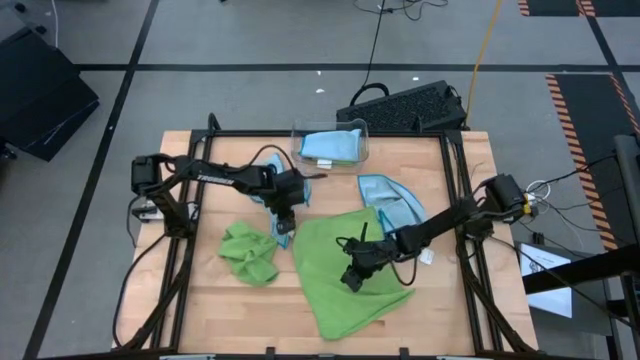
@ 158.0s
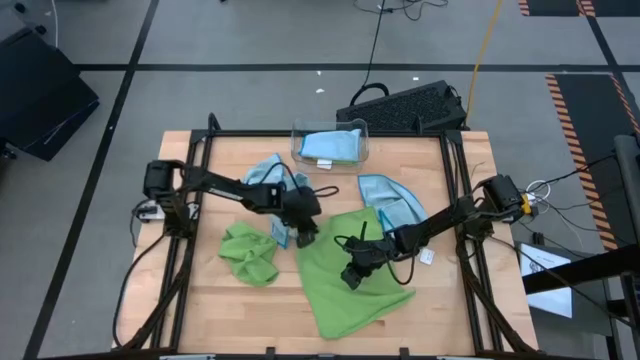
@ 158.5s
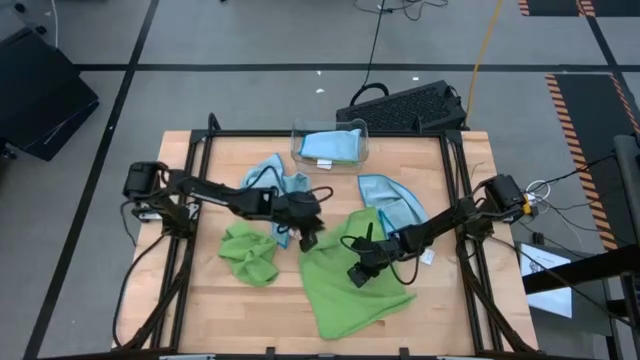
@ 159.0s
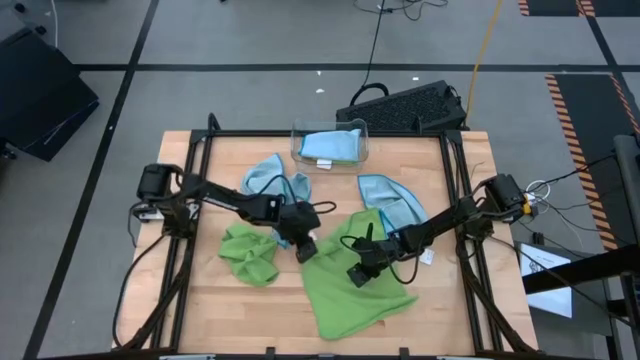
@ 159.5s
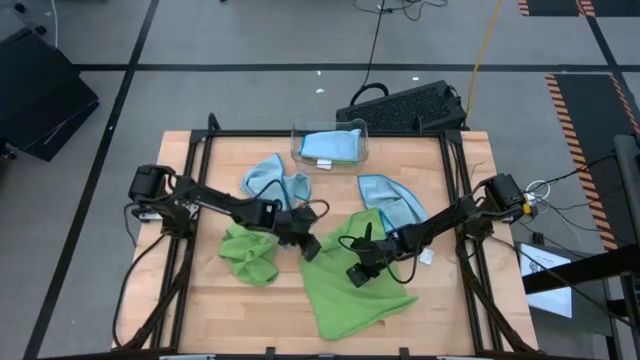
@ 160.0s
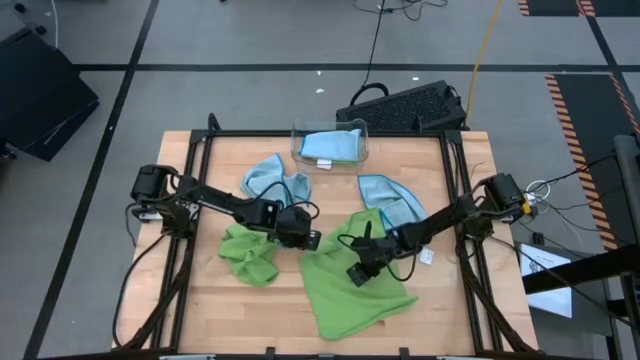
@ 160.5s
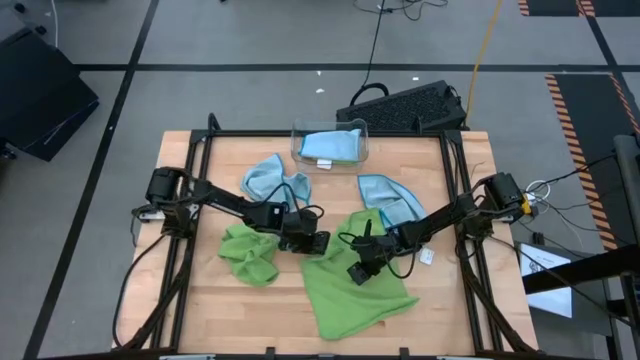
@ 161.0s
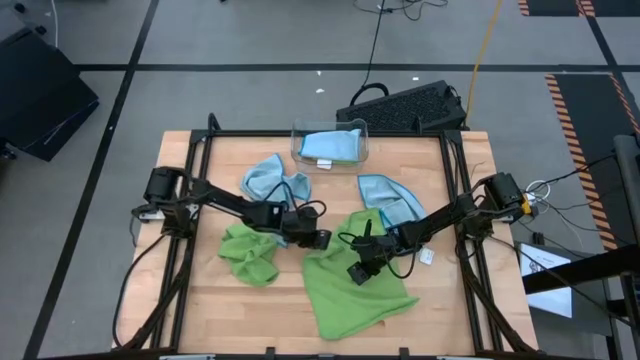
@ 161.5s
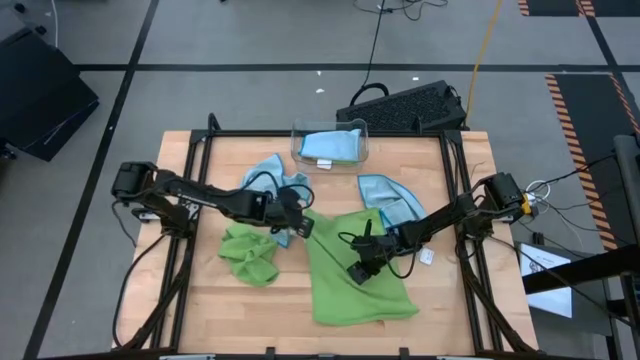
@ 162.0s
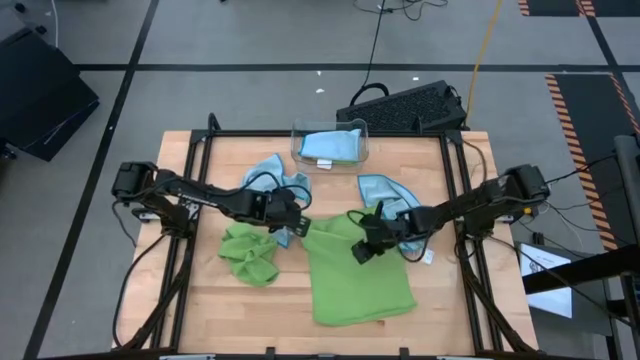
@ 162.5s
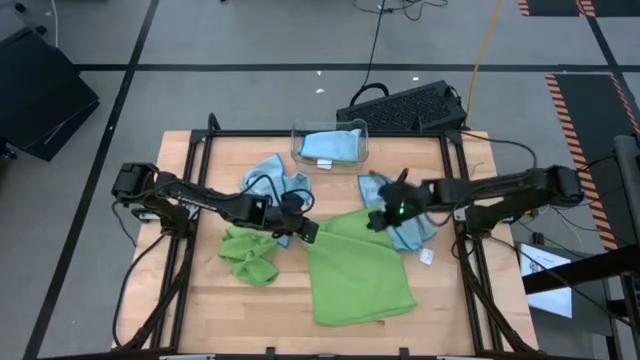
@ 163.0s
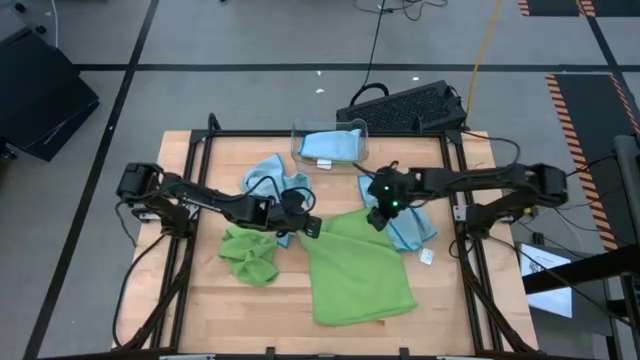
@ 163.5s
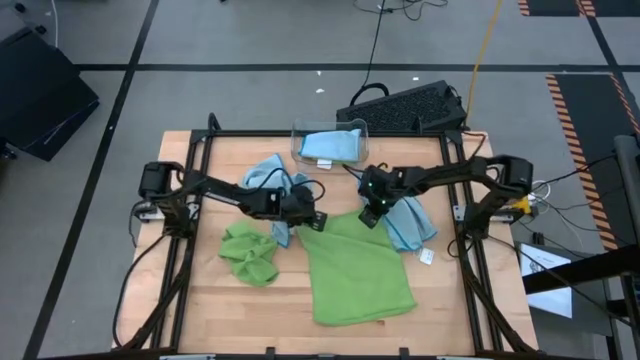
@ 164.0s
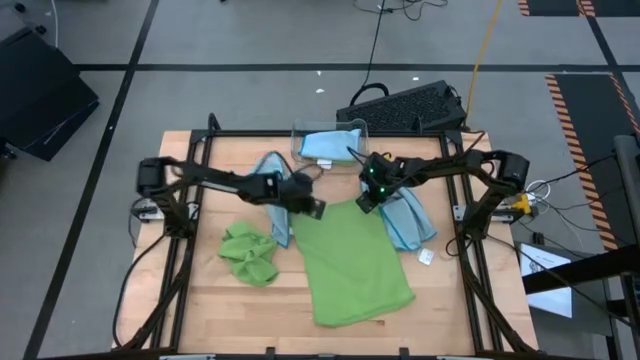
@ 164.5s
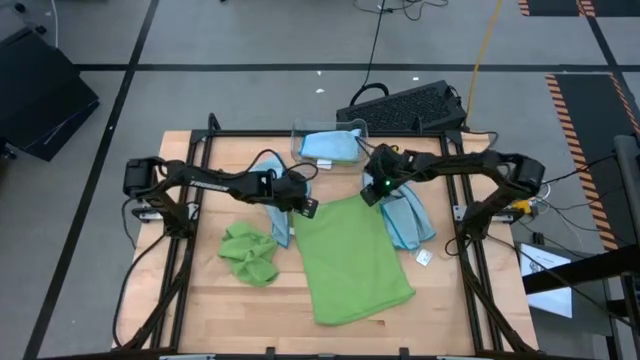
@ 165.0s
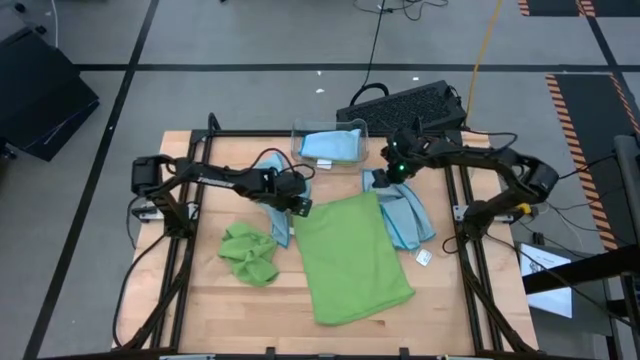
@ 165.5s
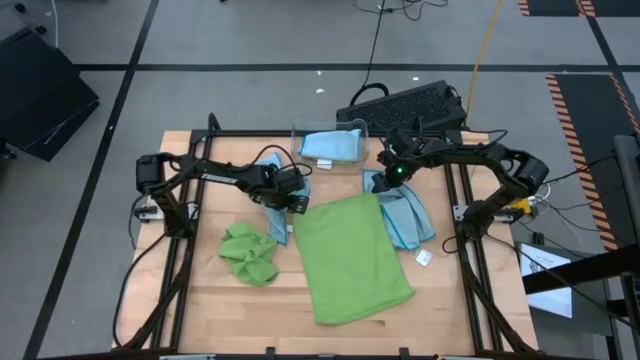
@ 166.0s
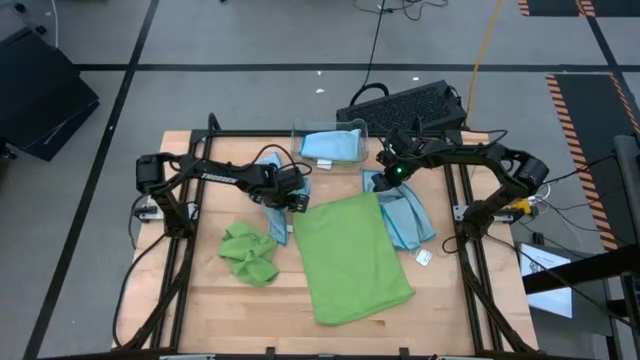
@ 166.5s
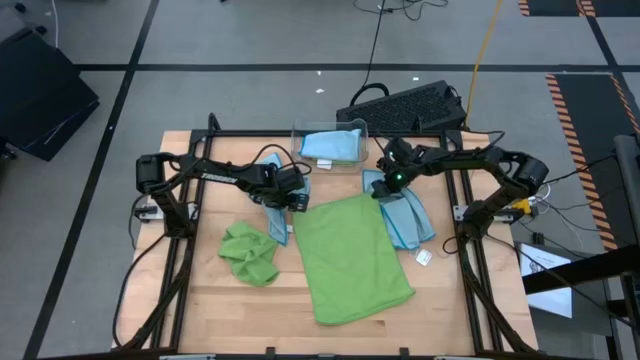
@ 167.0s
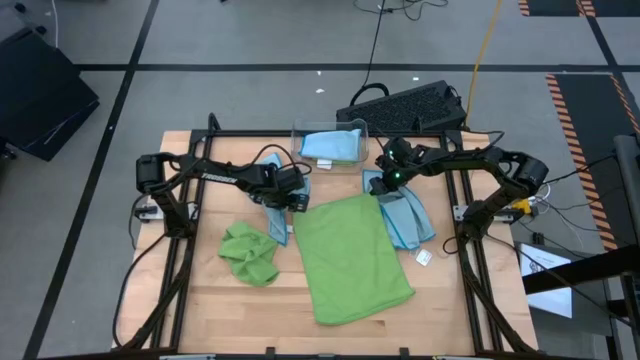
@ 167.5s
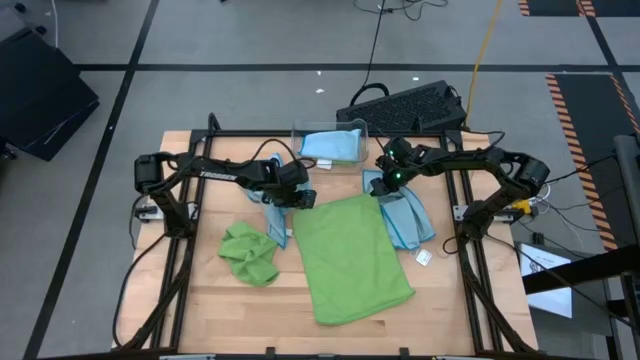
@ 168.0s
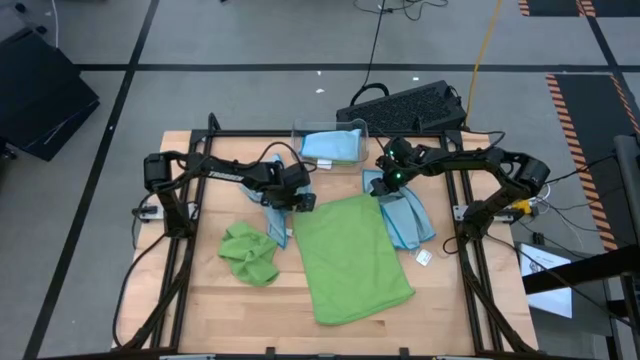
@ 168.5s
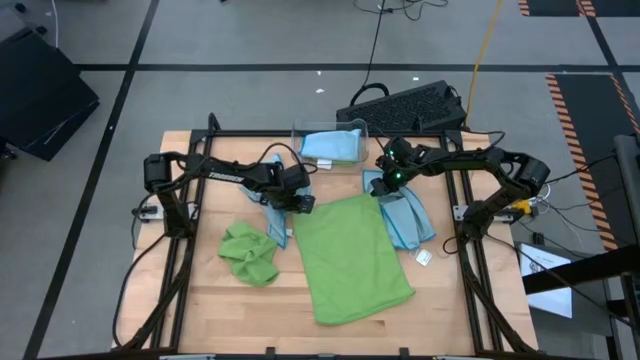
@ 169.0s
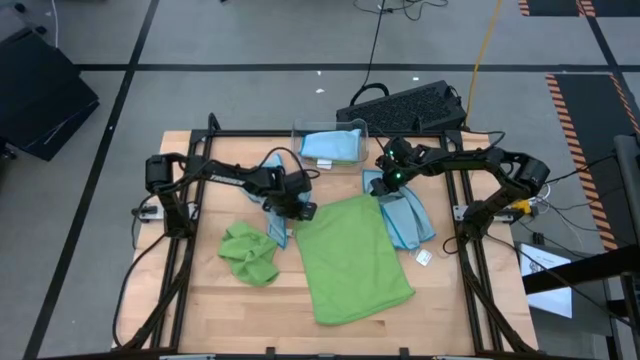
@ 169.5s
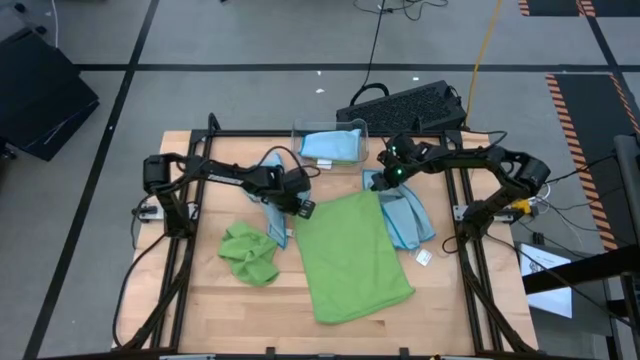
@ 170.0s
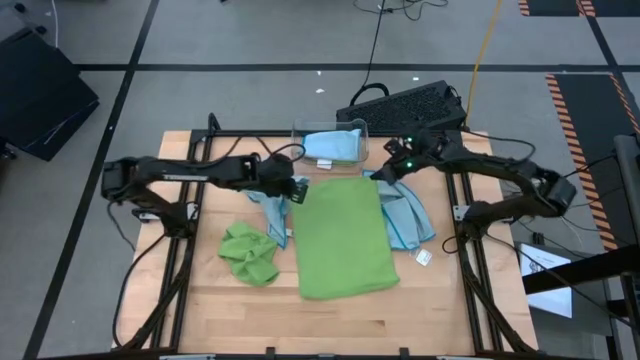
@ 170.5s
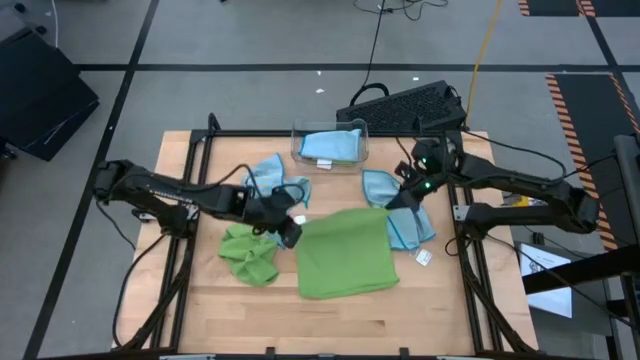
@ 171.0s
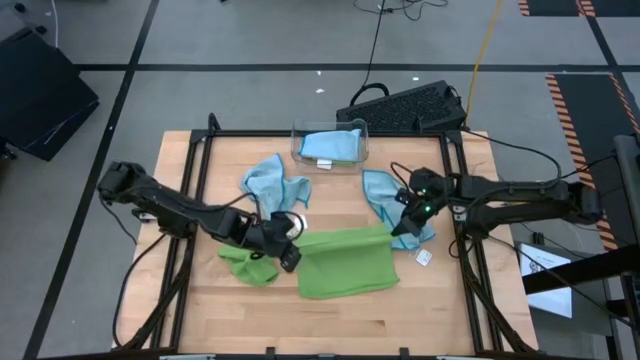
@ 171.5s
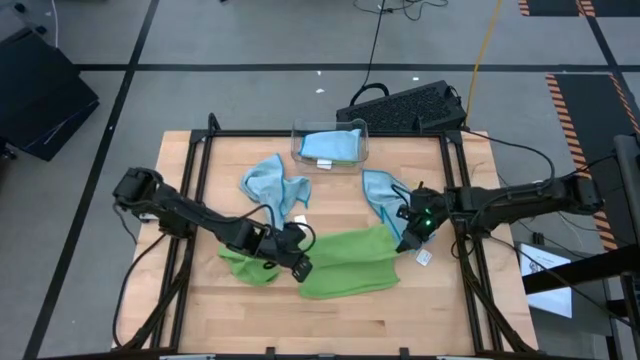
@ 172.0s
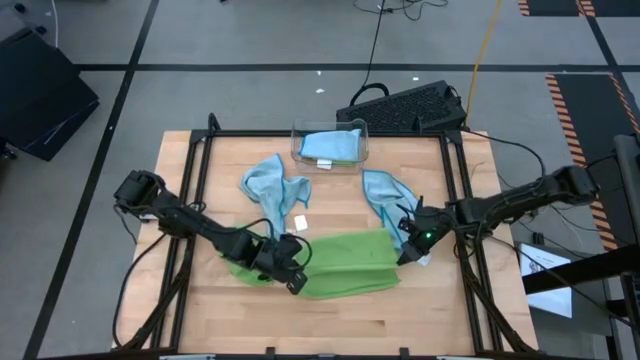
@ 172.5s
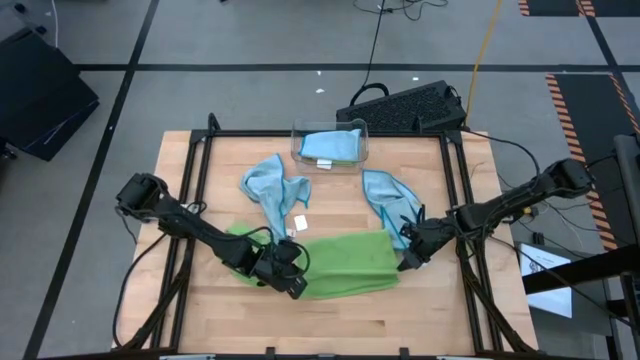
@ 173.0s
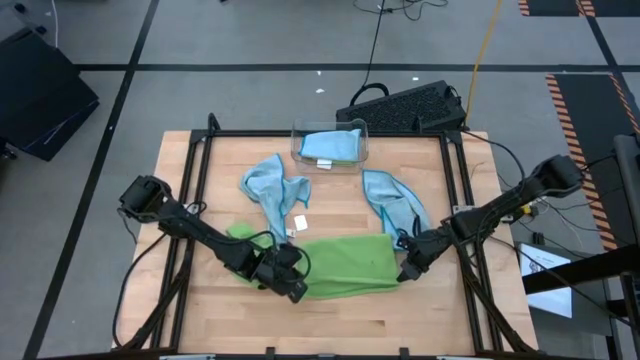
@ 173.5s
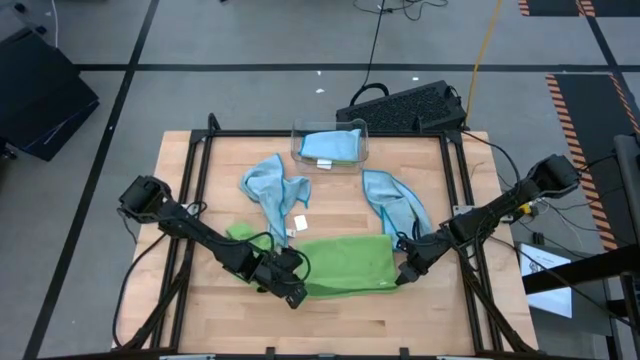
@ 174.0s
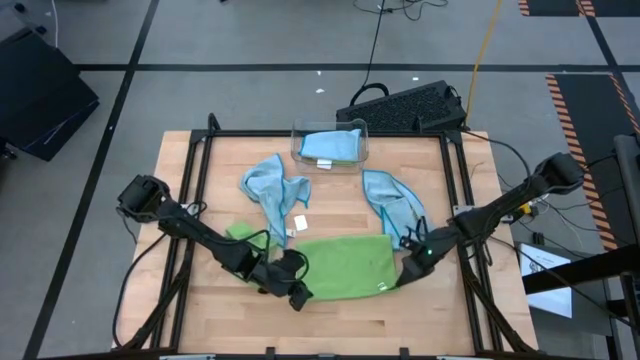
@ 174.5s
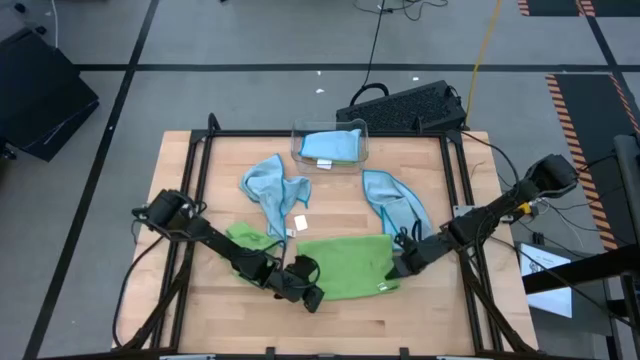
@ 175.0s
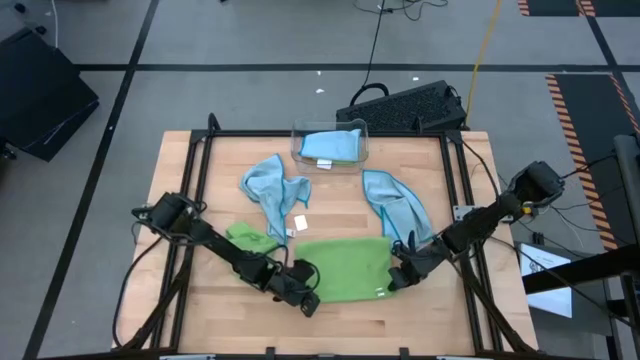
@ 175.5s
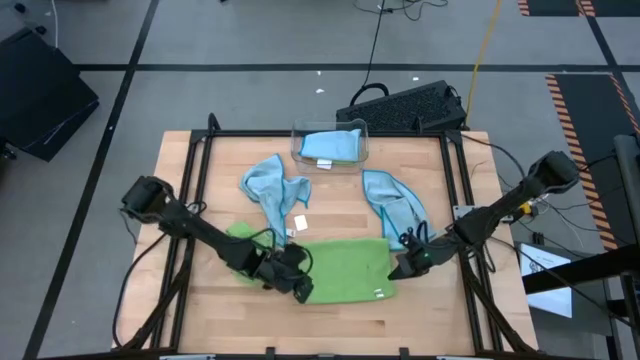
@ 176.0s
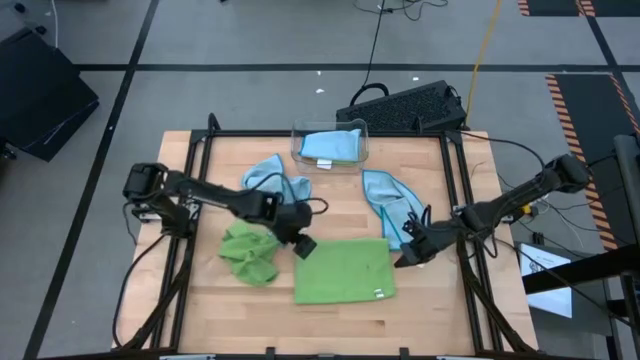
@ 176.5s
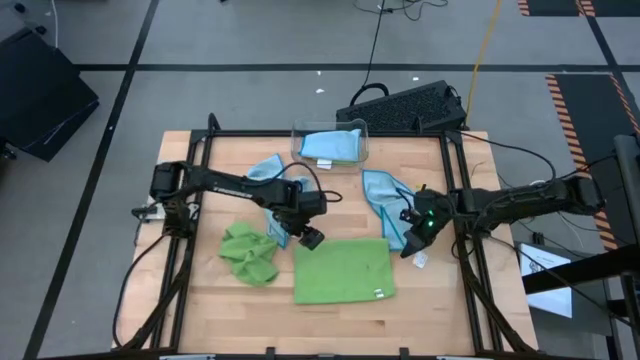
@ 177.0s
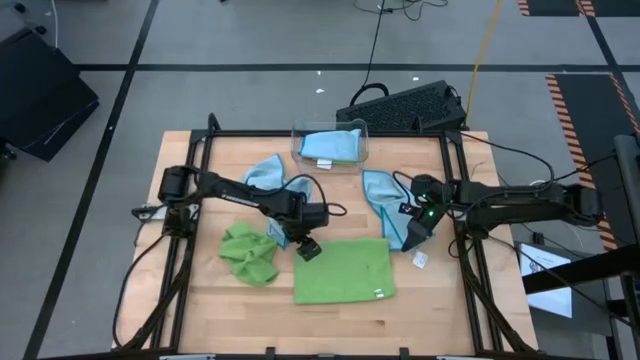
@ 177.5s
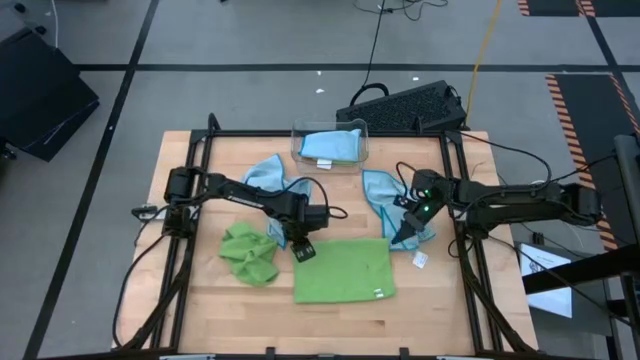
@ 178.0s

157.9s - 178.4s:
Task: Fold microfiber towels
Fold the right green microfiber cloth
